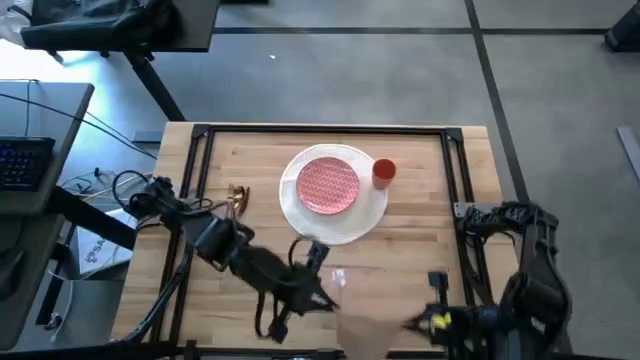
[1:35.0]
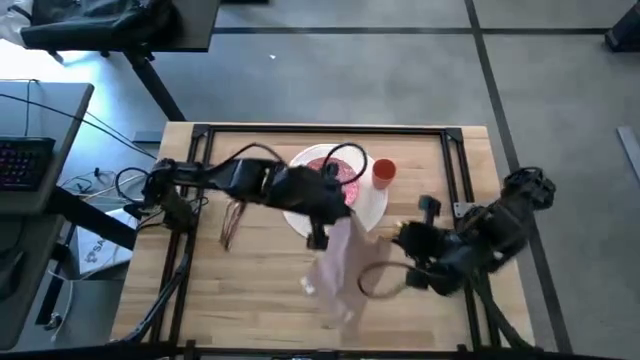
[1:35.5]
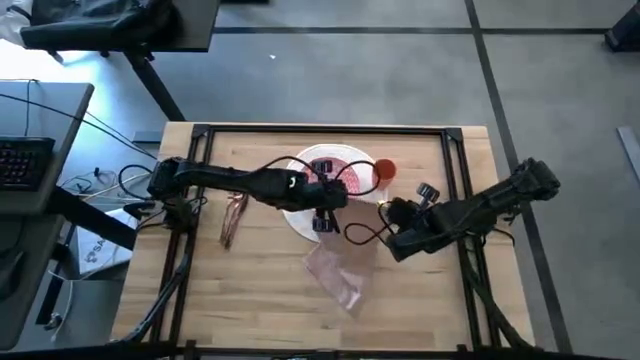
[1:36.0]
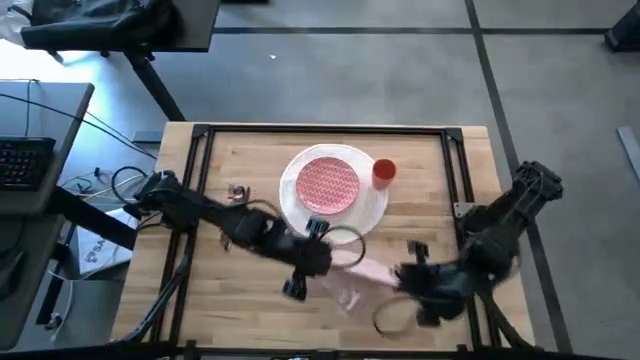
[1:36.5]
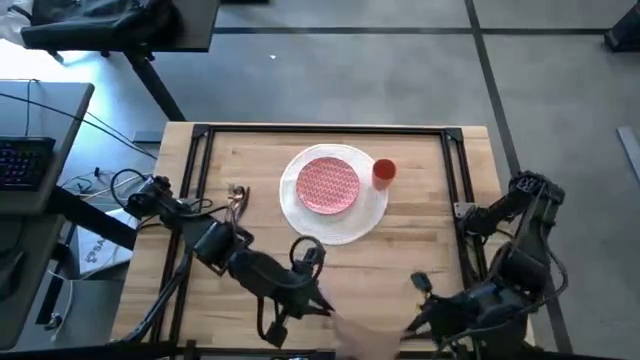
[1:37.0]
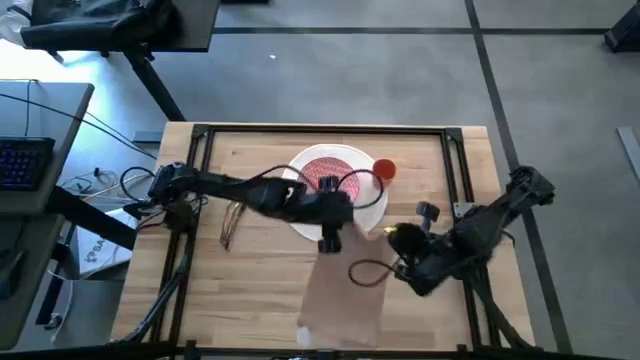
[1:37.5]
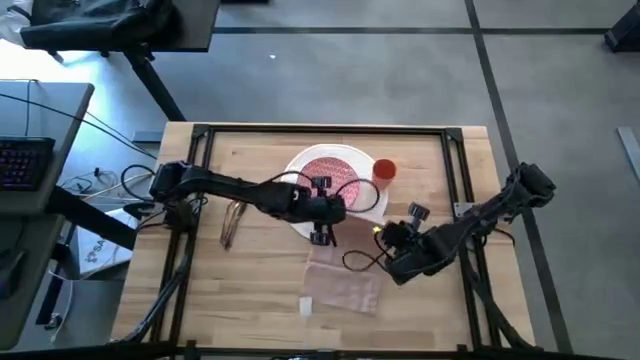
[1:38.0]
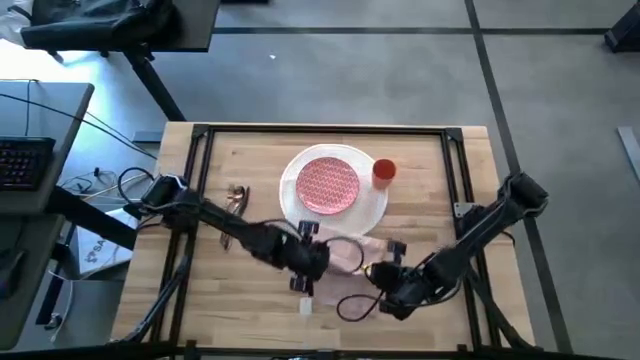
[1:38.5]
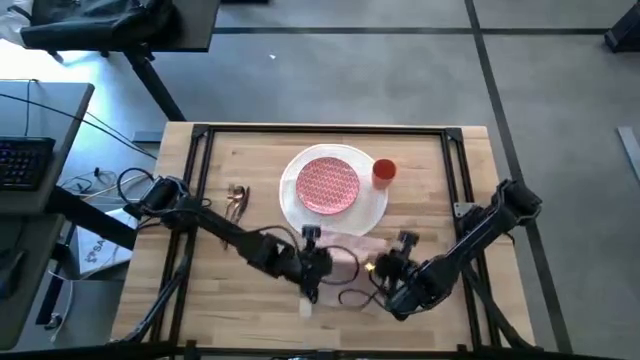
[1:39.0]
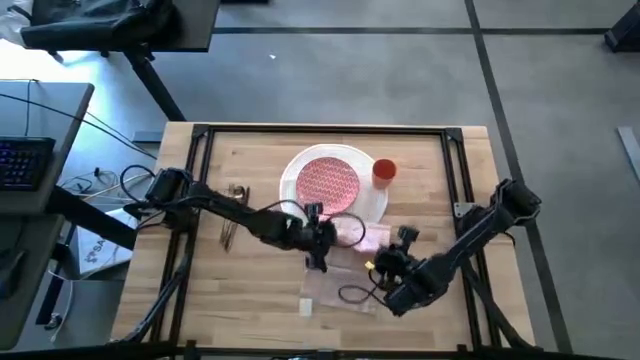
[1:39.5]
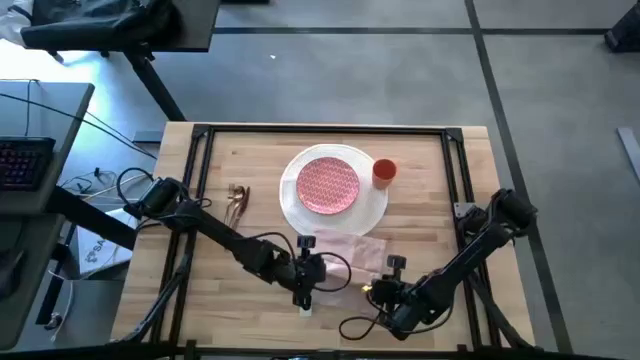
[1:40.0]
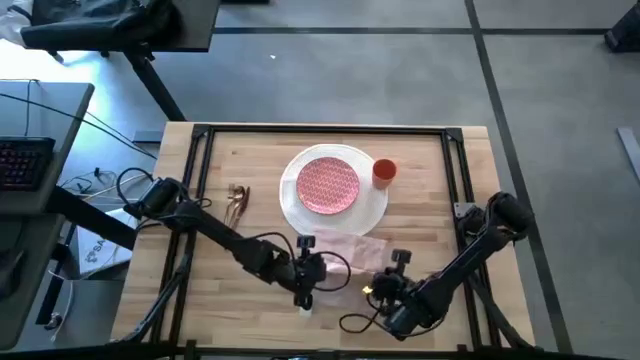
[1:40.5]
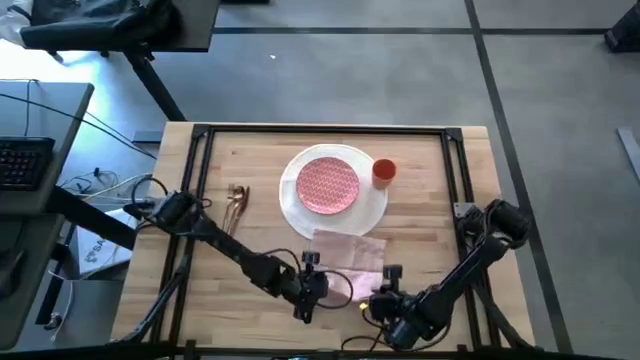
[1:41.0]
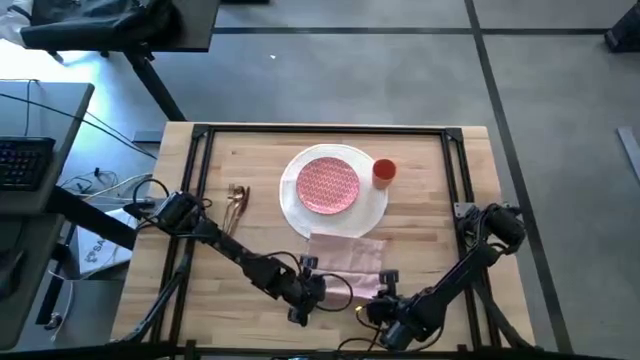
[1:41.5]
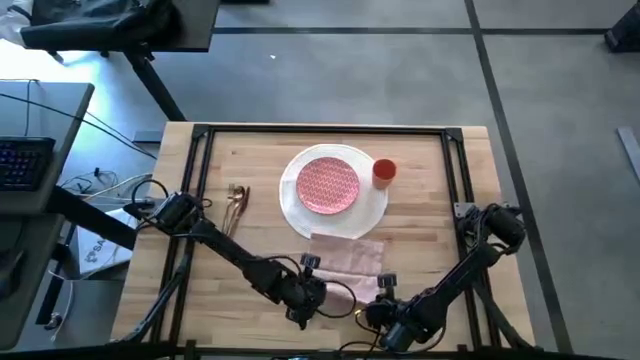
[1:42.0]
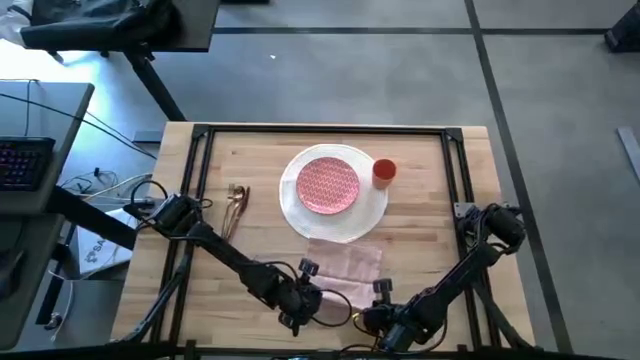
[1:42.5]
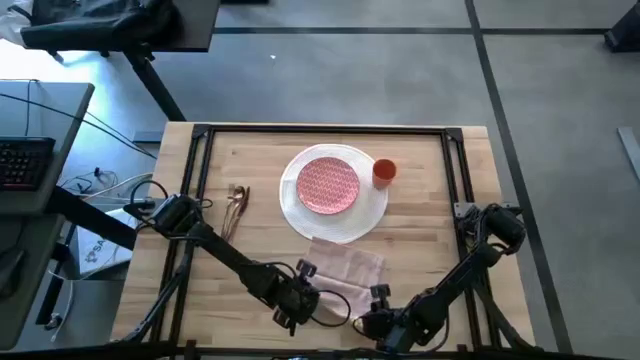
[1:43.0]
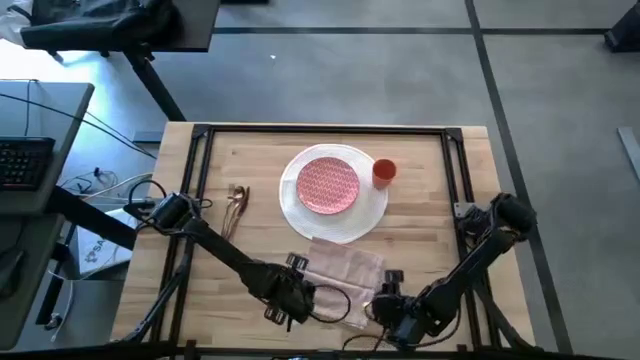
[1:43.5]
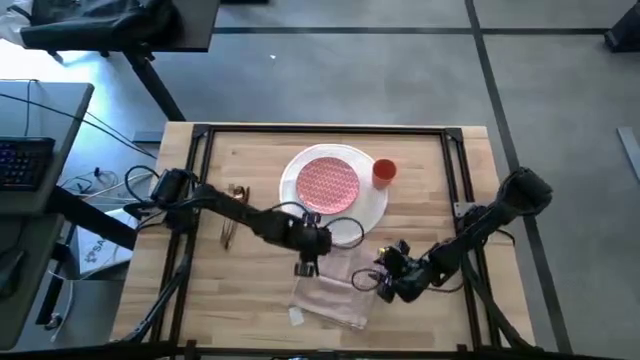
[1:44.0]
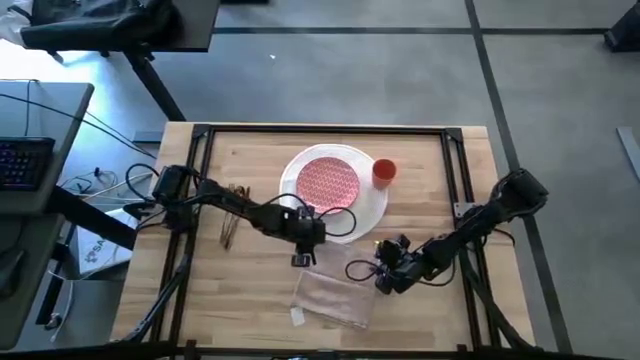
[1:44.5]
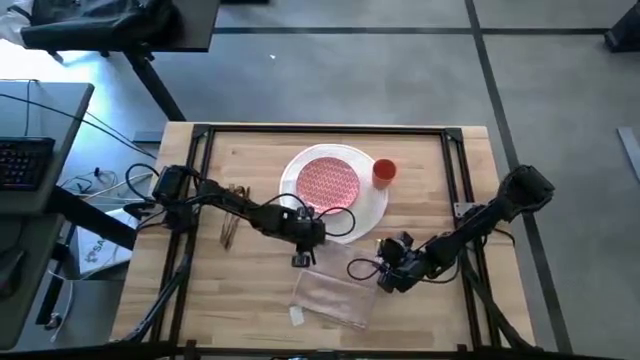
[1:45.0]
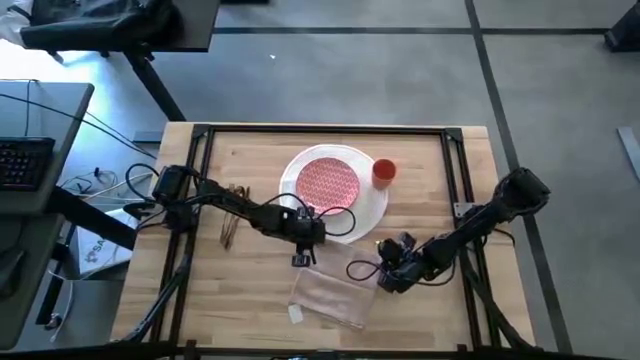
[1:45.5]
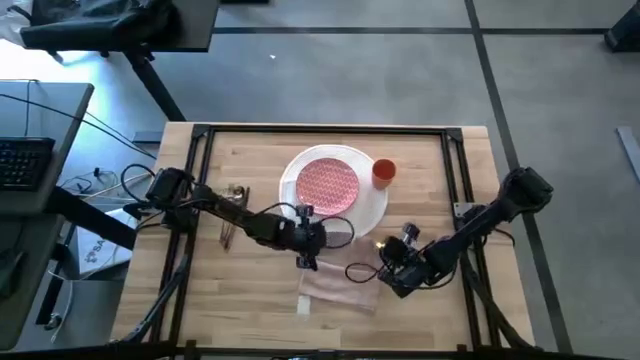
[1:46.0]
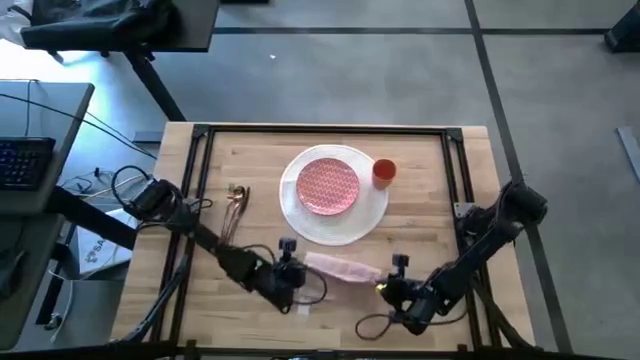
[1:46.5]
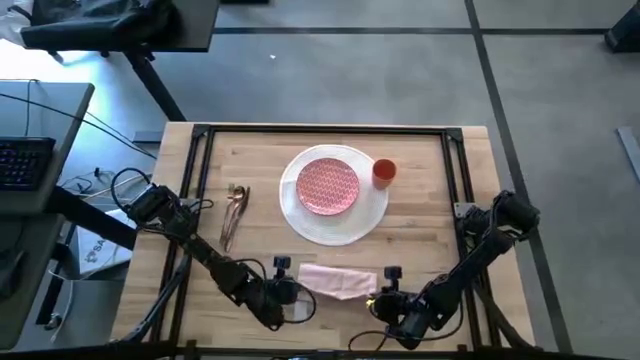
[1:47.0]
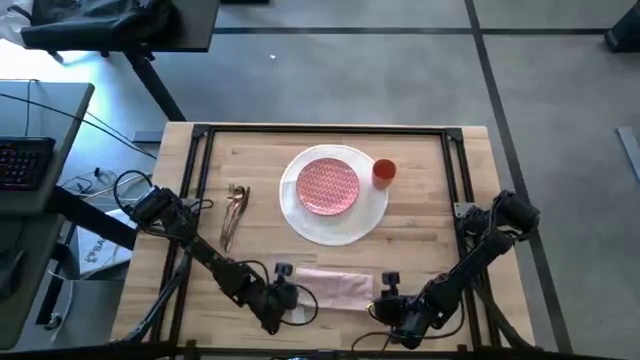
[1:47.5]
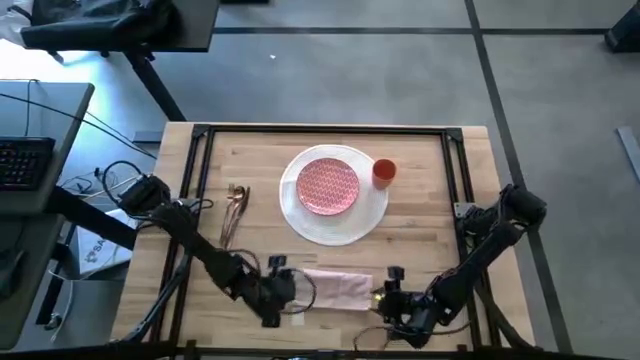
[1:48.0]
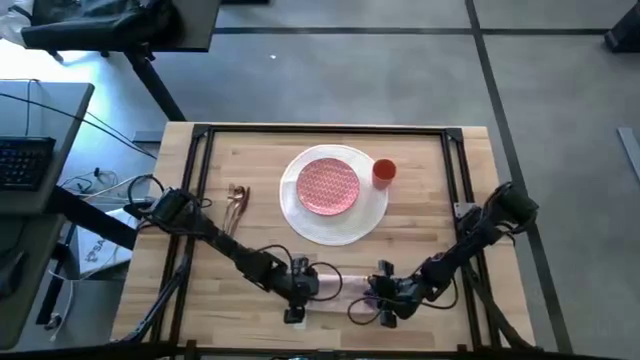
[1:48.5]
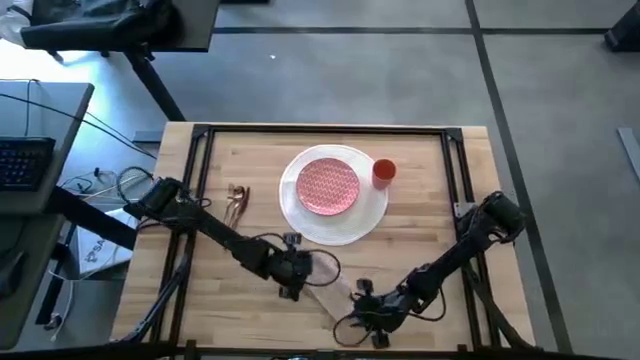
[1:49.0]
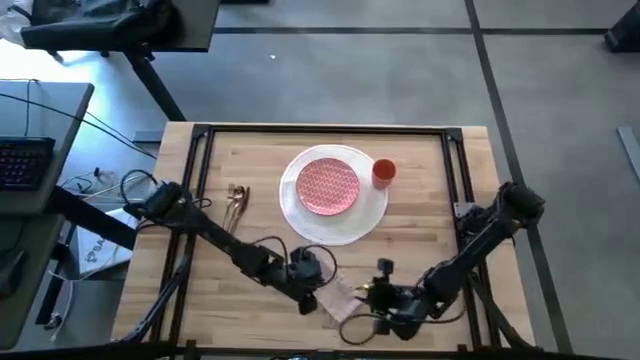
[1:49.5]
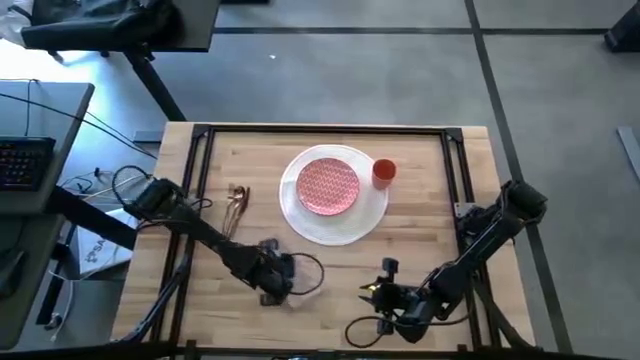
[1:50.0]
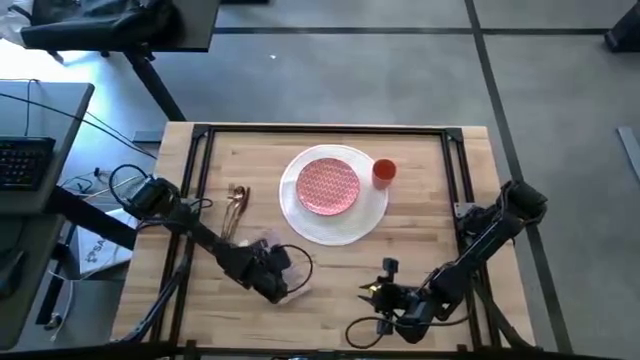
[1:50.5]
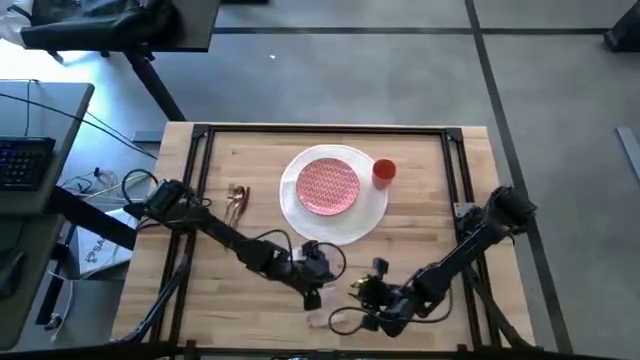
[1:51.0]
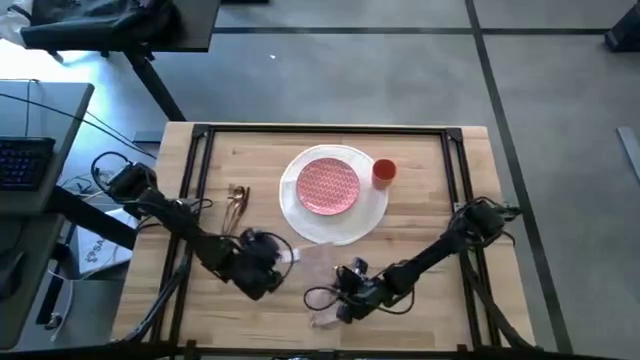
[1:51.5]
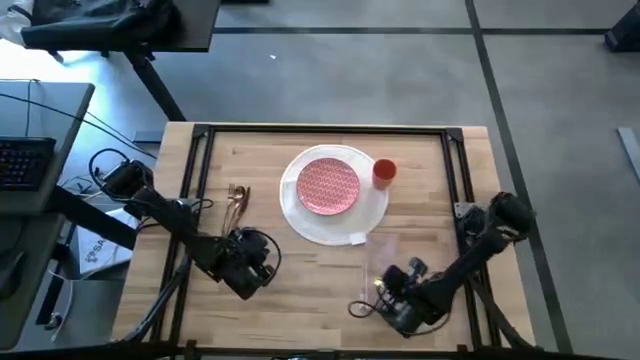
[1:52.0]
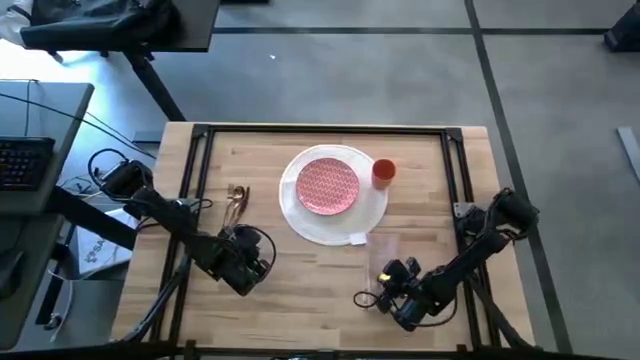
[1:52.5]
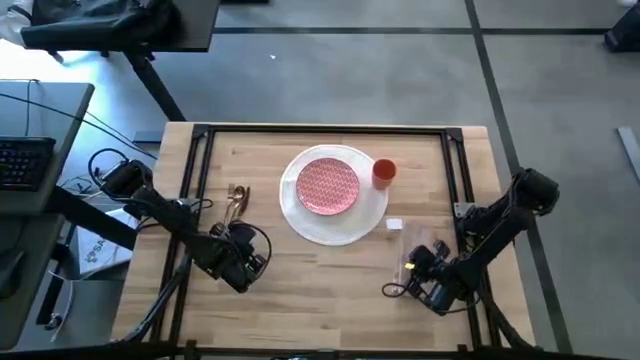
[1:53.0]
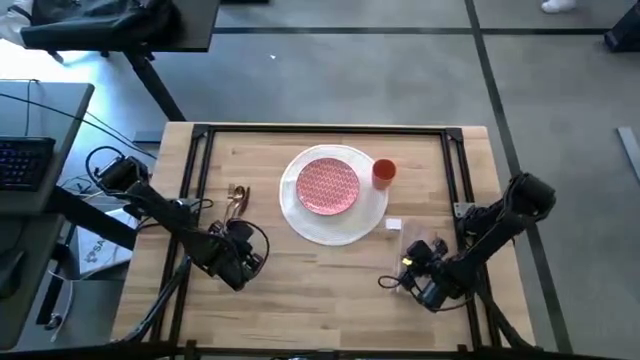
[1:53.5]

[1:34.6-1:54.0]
Task: Set table place
Fold the napkin

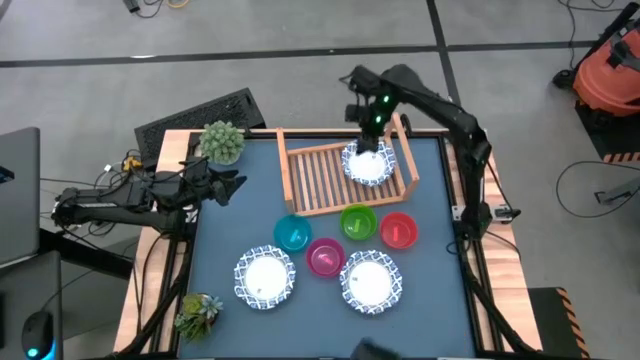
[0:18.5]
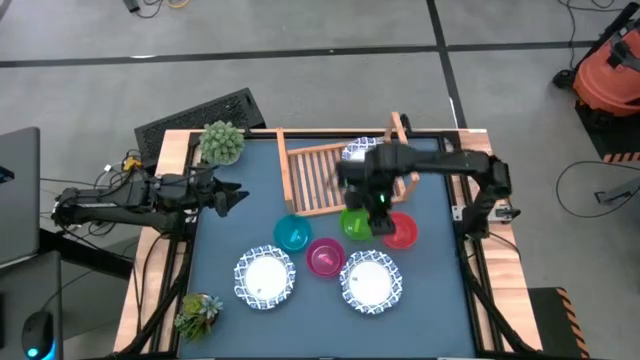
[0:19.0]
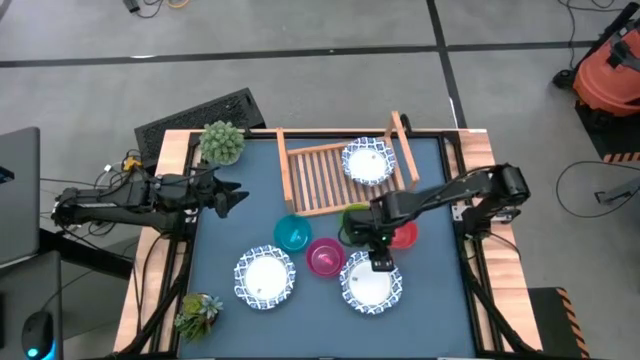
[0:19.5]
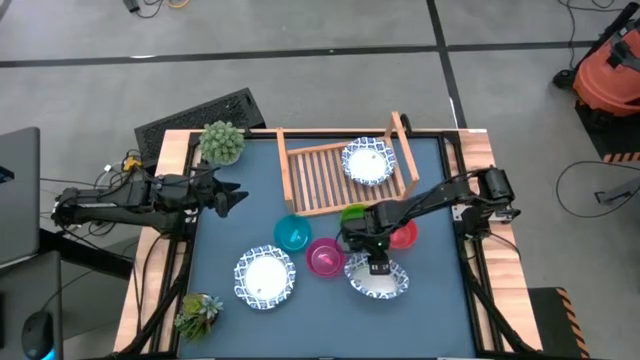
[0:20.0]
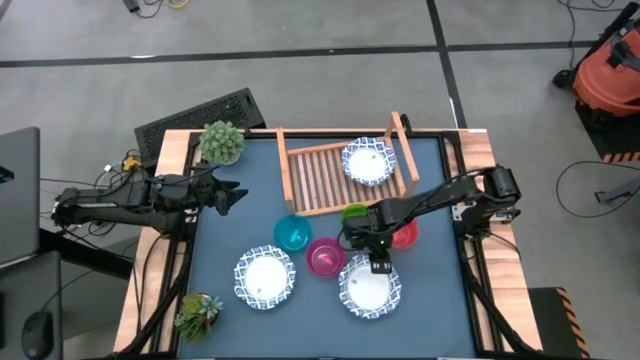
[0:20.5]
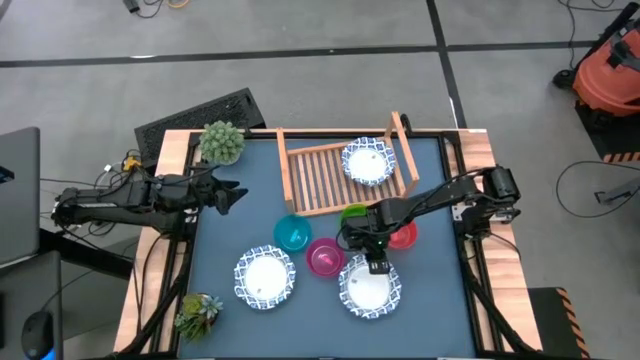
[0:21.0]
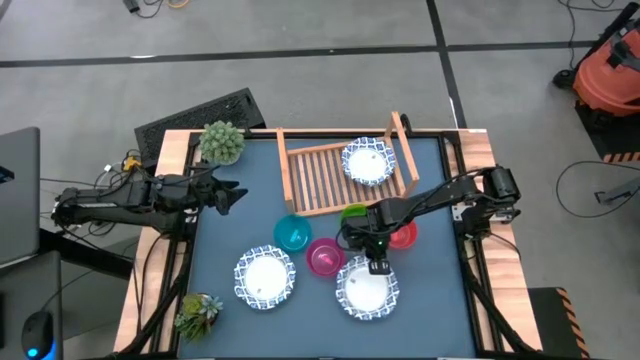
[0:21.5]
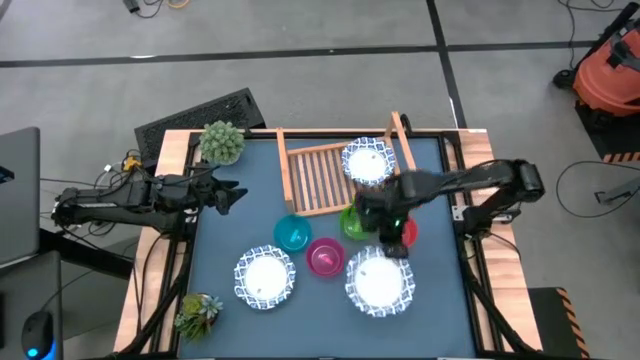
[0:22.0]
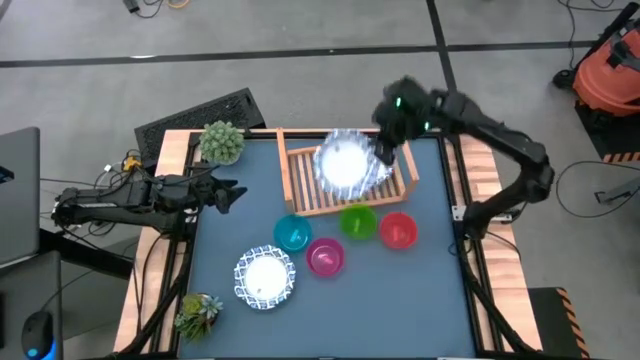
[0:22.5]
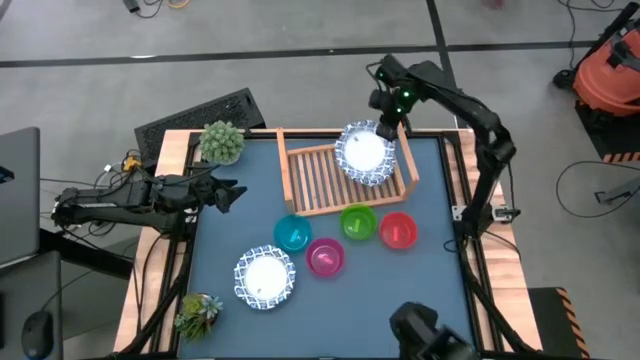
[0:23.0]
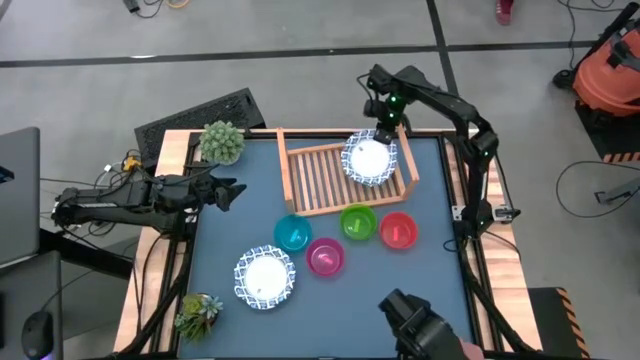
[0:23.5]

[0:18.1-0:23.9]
Task: Place and stack bowls onto a shelf
Stack the white bowl on top of the white bowl on the shelf
